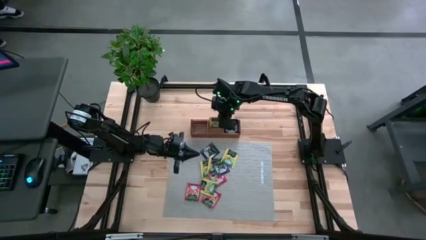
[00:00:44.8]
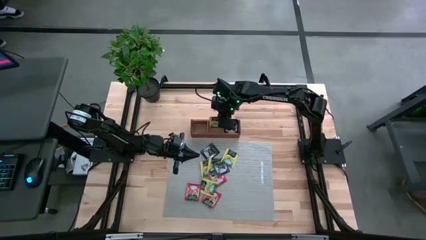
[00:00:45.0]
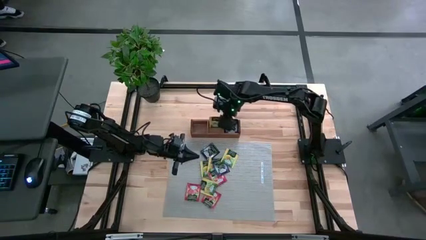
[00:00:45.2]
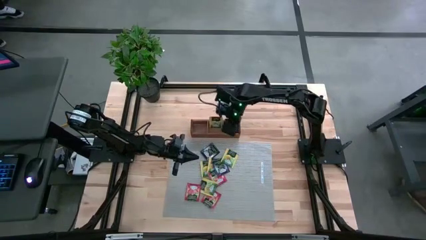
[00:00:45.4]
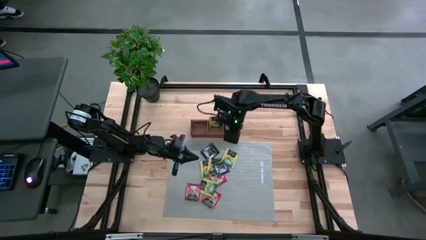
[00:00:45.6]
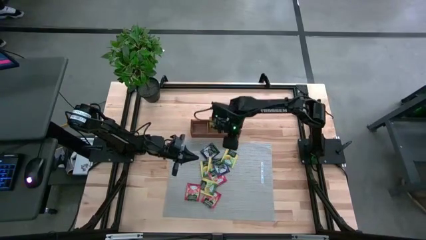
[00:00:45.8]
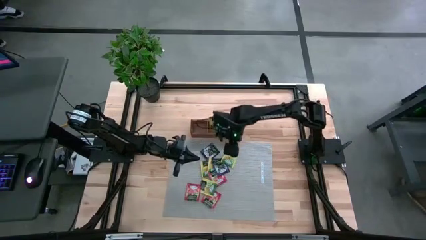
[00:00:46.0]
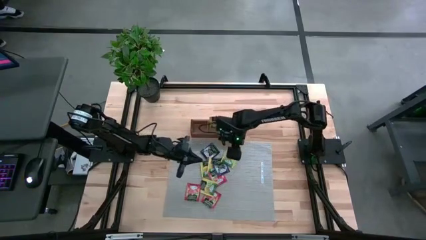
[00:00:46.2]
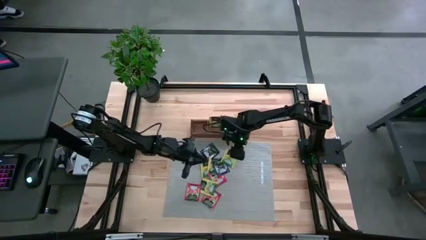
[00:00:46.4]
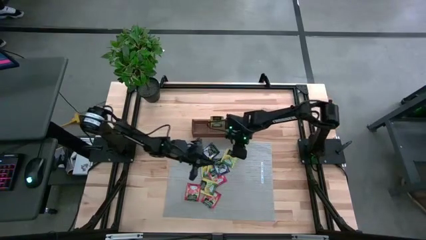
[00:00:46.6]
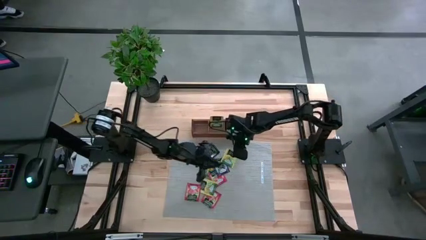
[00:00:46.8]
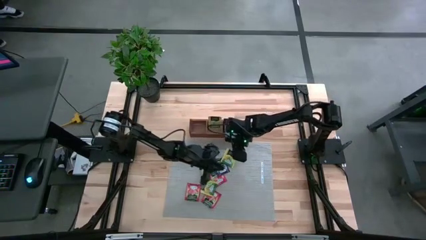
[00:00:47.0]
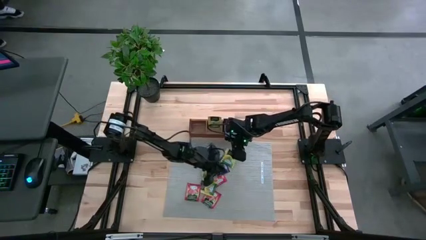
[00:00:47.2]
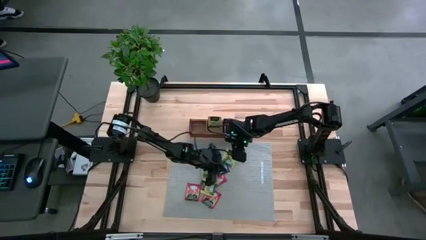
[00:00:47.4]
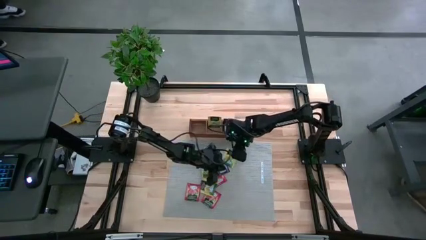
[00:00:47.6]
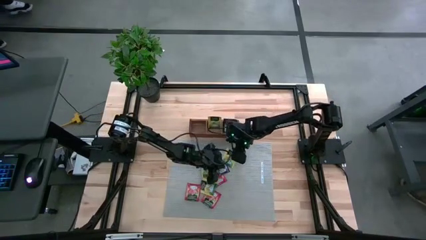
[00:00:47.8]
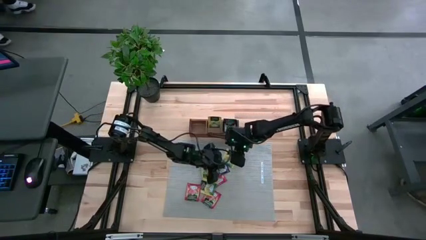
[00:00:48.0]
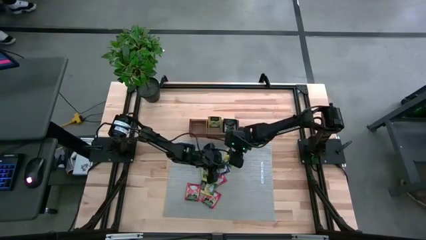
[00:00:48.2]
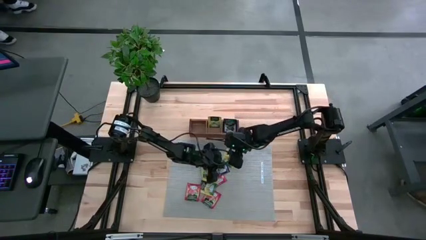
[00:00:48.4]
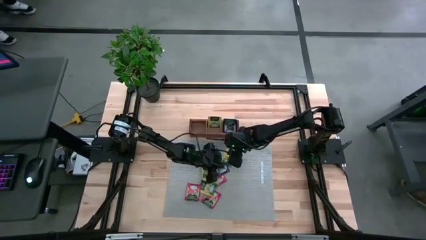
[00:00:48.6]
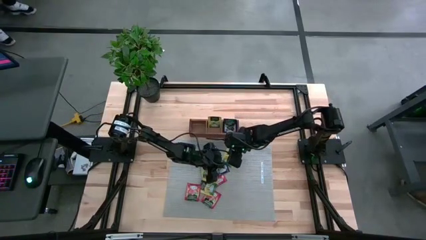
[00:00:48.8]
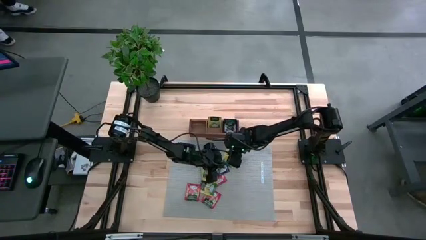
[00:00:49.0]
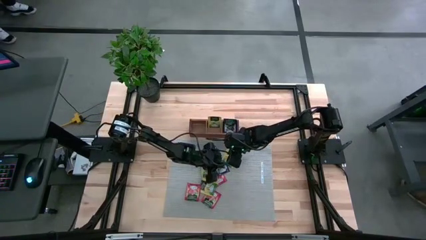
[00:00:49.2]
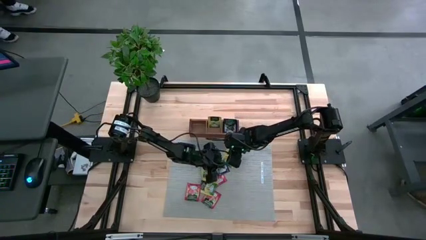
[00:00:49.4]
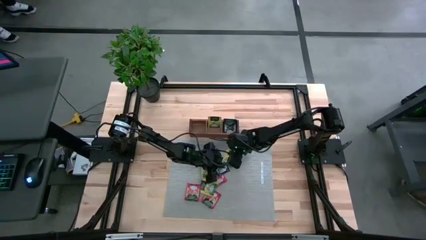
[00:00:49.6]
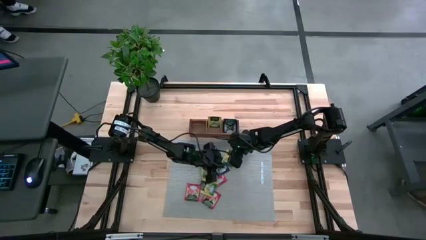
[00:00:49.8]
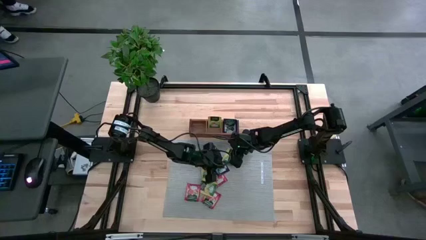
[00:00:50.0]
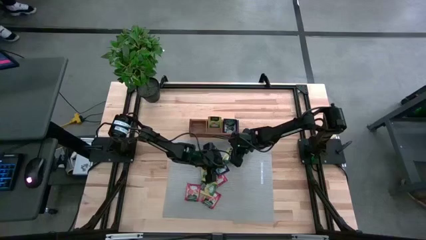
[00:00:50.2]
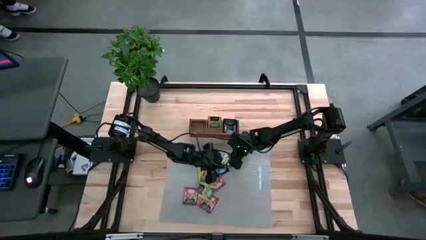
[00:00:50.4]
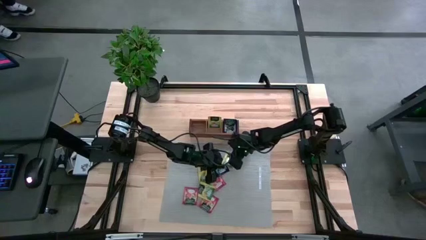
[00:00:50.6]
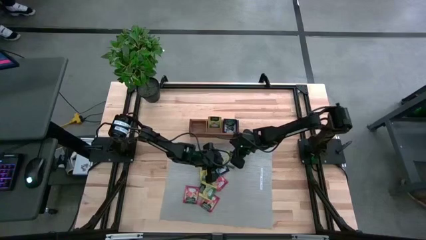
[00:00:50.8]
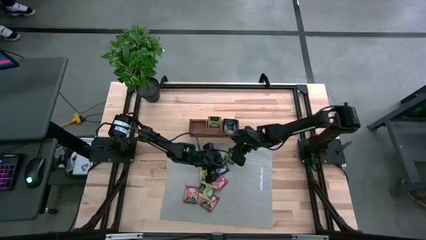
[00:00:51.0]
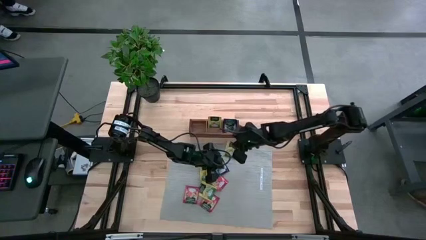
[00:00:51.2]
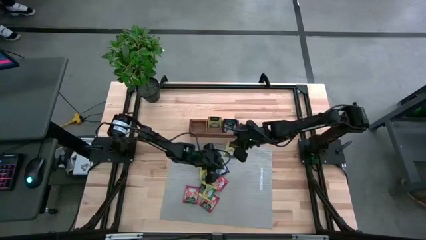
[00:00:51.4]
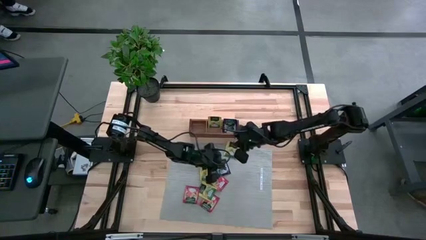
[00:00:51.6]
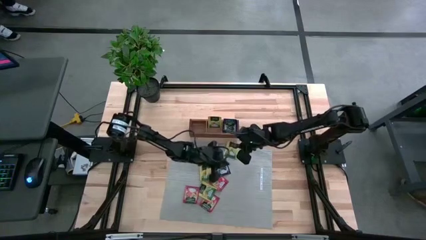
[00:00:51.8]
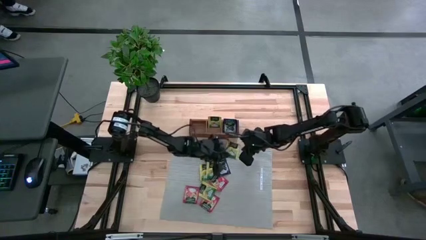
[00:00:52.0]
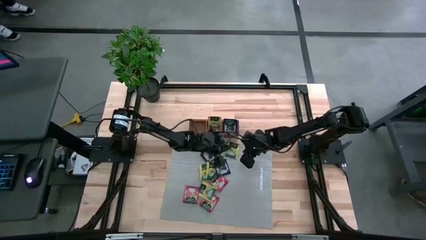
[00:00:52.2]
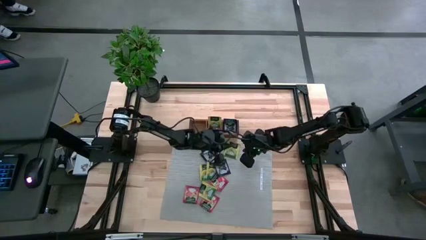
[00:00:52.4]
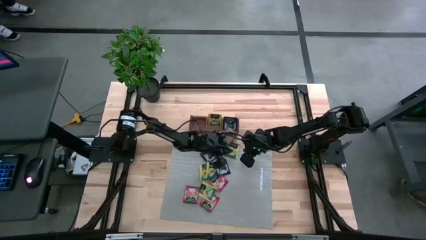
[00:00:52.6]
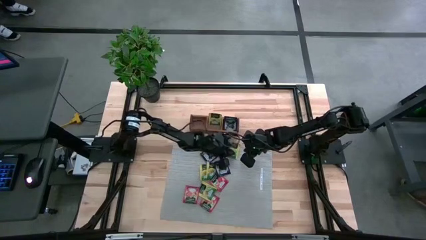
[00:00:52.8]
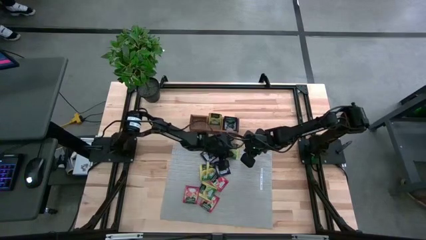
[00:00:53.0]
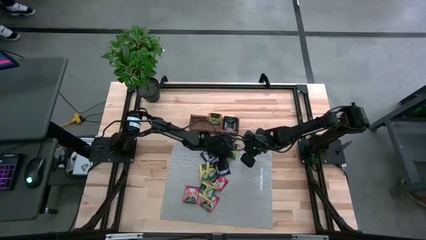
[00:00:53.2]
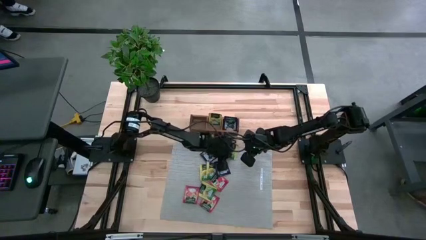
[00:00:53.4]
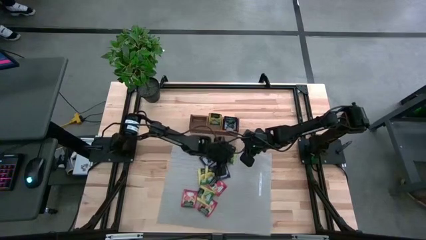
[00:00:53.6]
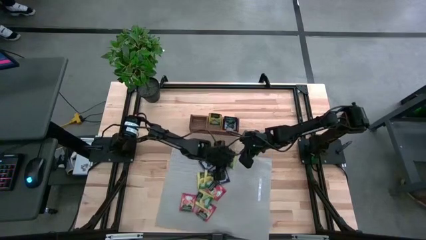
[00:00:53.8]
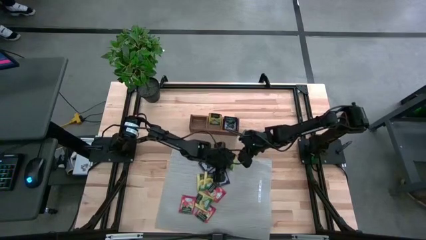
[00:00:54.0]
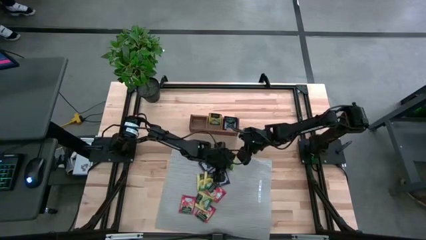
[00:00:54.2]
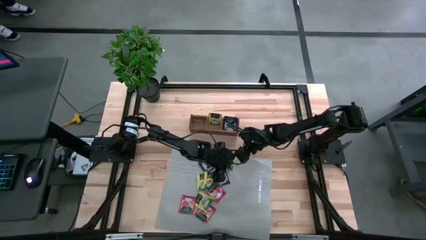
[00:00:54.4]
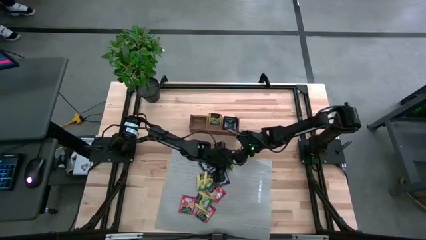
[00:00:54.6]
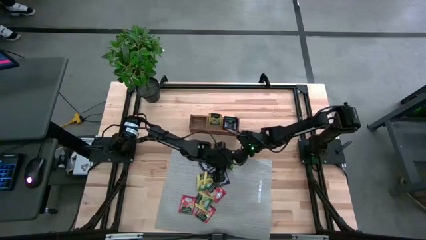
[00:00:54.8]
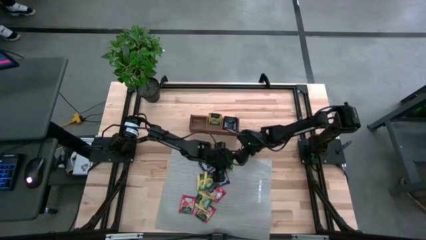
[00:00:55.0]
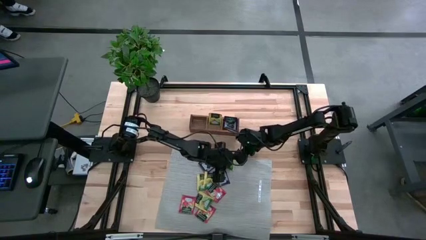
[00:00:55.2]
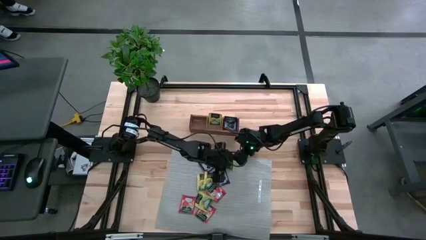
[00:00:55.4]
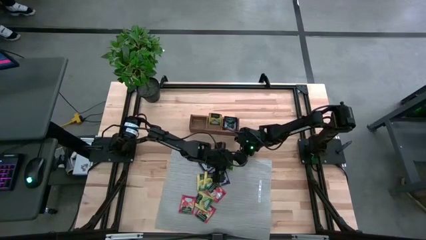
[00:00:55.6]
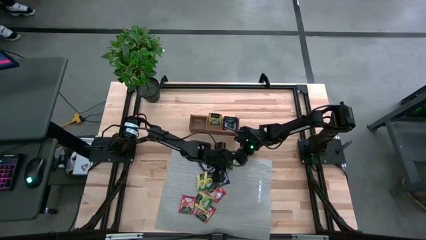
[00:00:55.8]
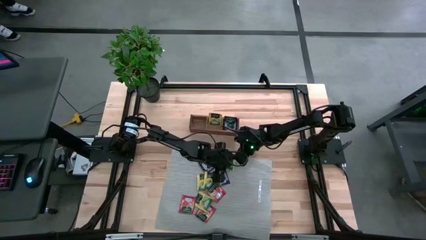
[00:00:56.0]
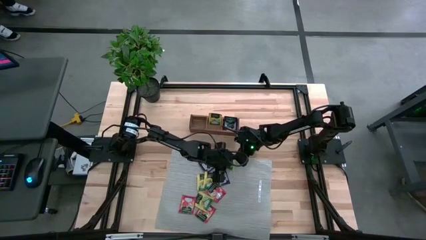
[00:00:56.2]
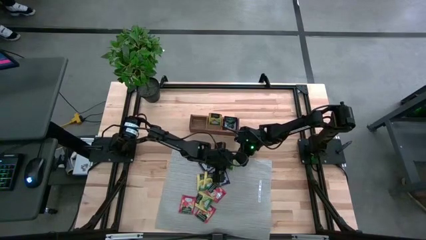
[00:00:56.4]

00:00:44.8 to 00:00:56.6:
Task: Pick & Place Tea
Put the yellow tea bag into the middle section of the wooden organizer

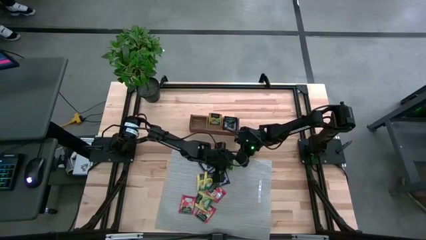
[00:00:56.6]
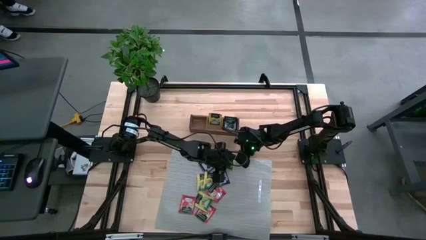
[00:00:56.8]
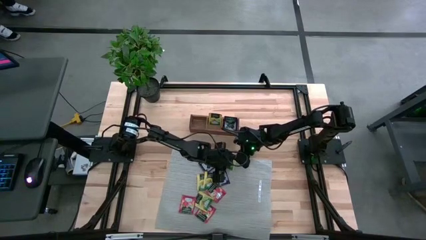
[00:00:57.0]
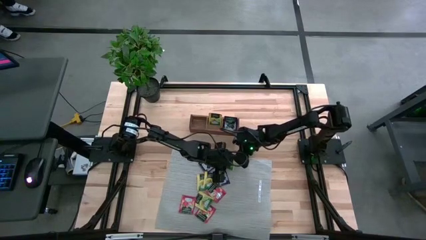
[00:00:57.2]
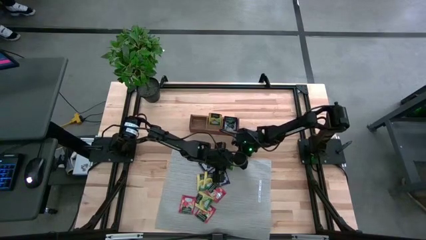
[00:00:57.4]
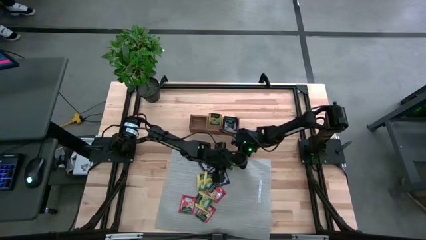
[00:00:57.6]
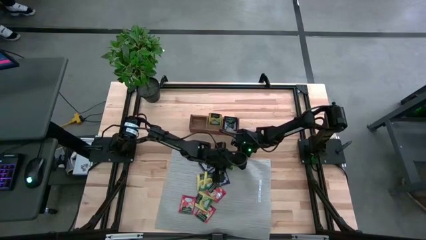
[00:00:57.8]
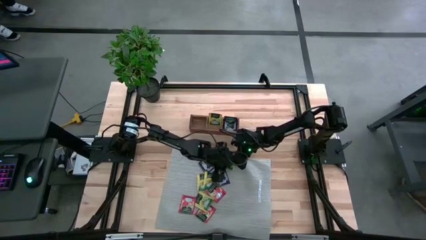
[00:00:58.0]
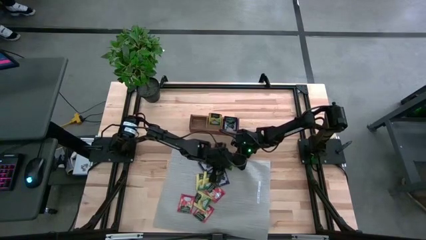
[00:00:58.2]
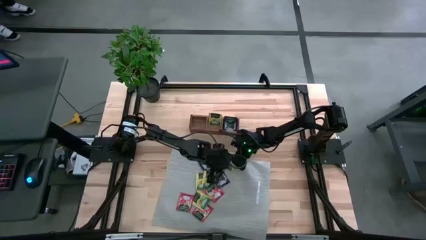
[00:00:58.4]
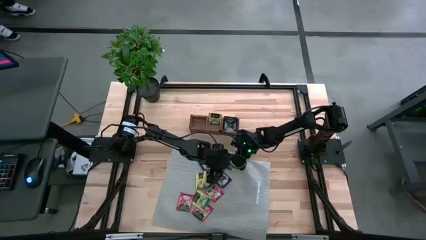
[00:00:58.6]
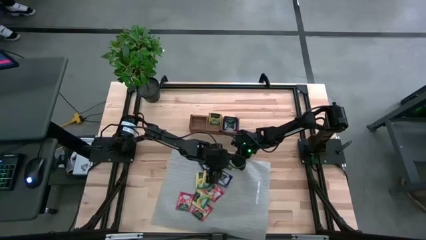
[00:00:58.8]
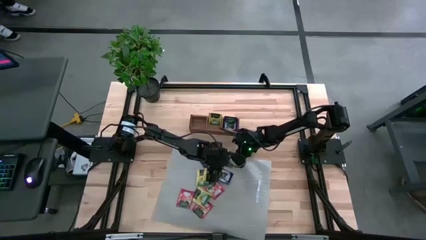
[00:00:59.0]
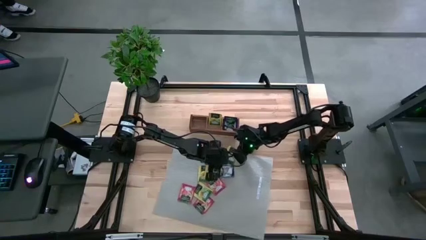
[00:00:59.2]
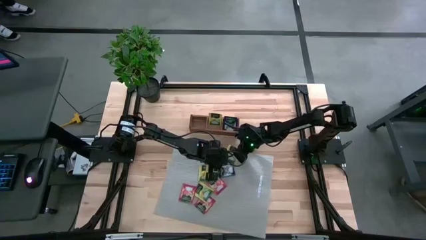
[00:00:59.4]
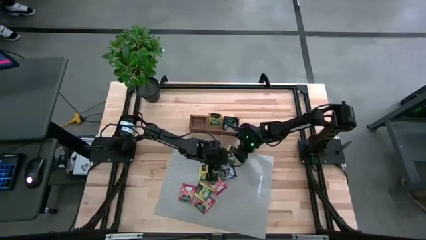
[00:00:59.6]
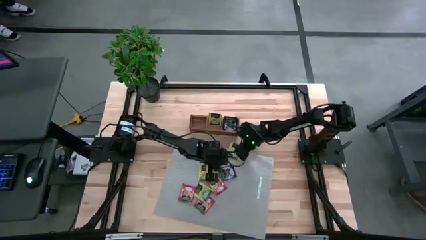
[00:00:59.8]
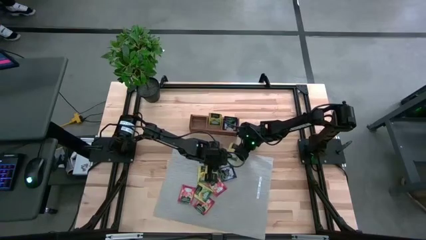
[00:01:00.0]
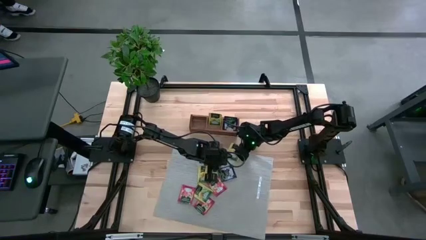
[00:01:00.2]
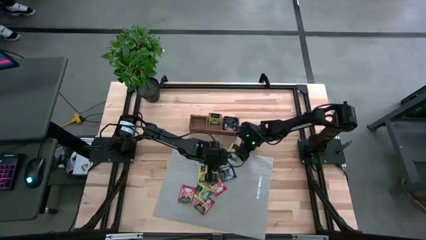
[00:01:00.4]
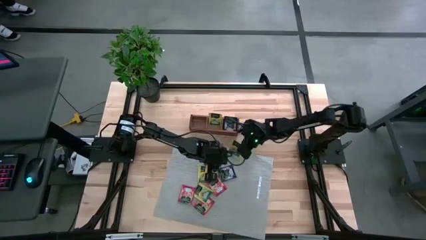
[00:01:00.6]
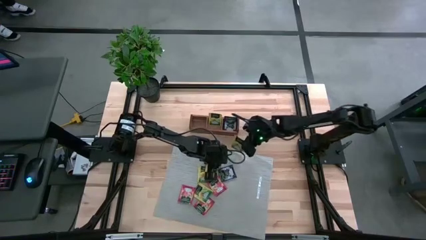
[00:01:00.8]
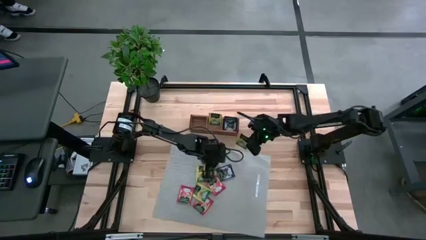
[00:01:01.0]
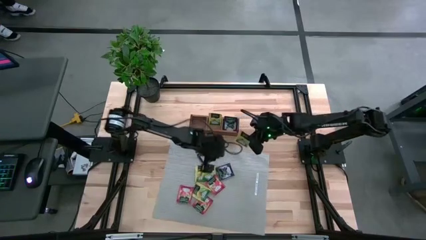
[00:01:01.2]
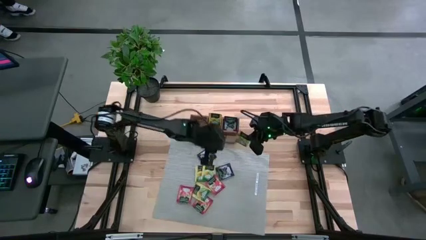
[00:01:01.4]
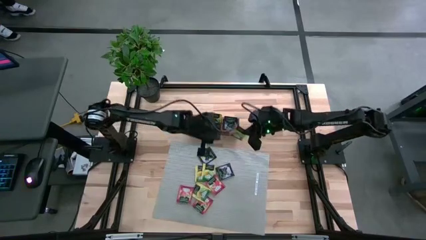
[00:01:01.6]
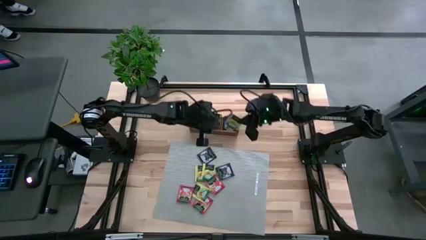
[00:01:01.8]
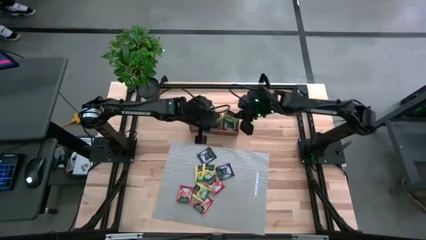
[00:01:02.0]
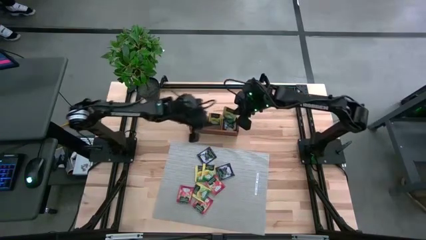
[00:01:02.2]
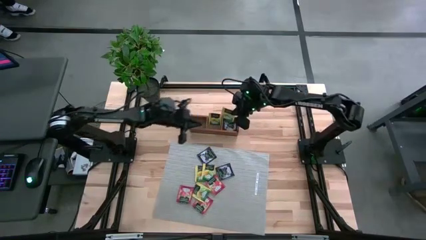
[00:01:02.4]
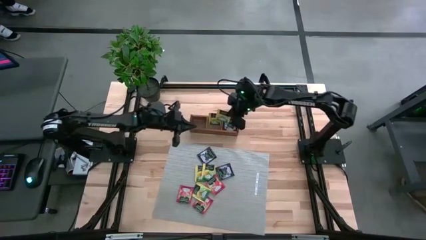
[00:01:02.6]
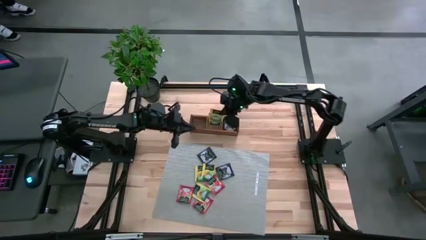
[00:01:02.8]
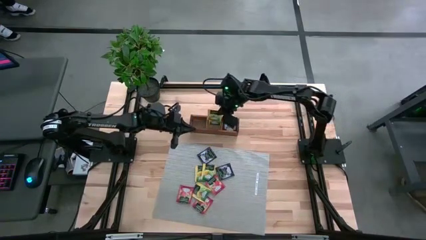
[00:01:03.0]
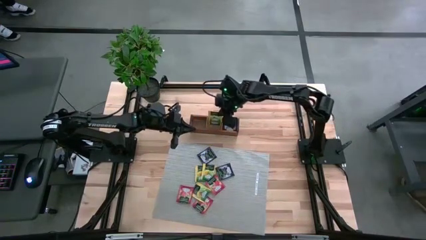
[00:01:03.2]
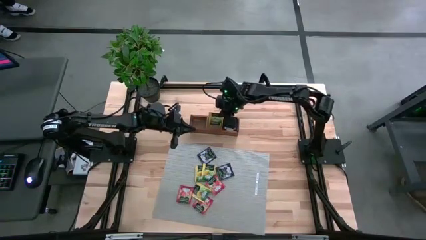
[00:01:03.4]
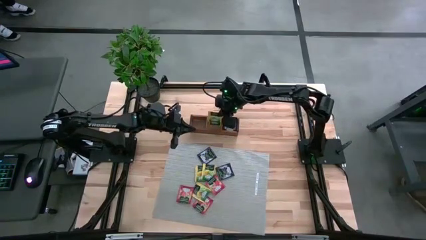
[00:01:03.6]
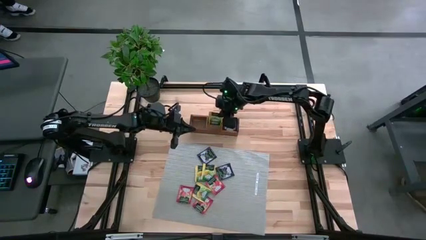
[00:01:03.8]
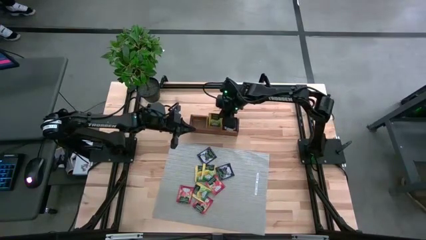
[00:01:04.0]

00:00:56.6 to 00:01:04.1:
Put the yellow tea bag into the middle section of the wooden organizer
